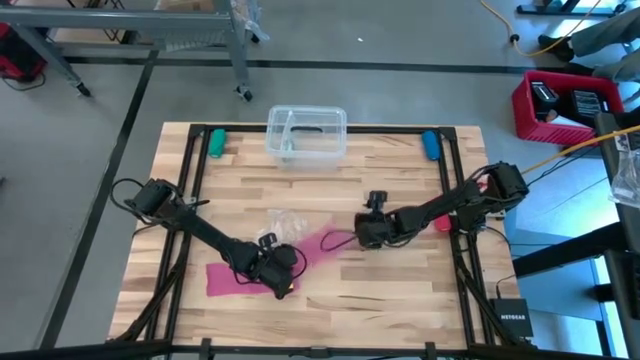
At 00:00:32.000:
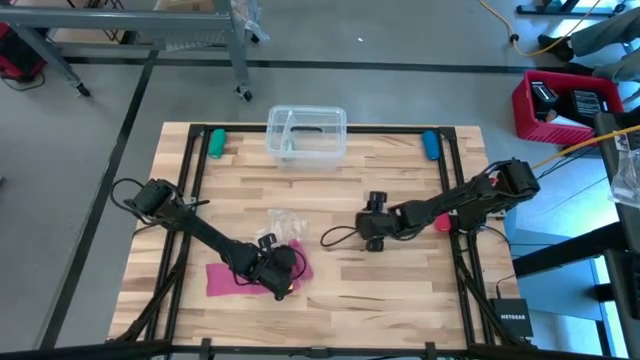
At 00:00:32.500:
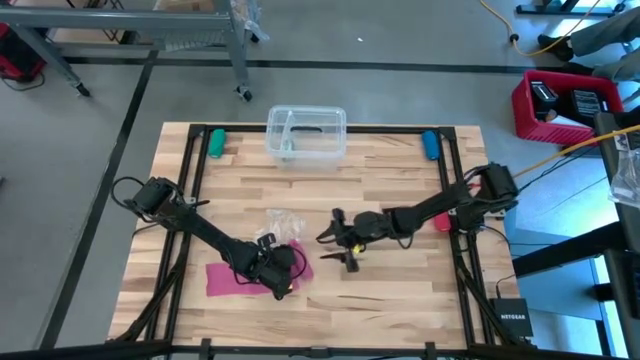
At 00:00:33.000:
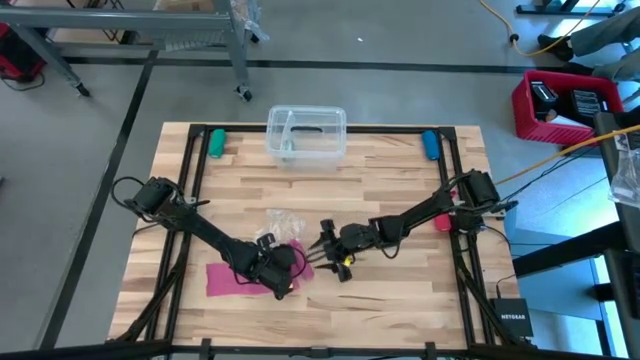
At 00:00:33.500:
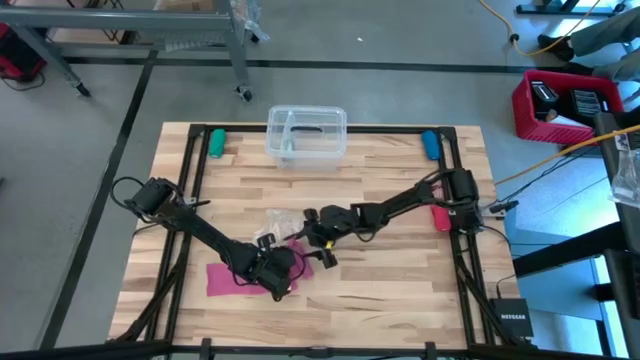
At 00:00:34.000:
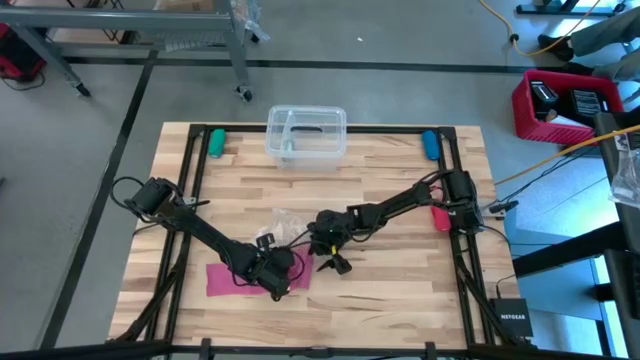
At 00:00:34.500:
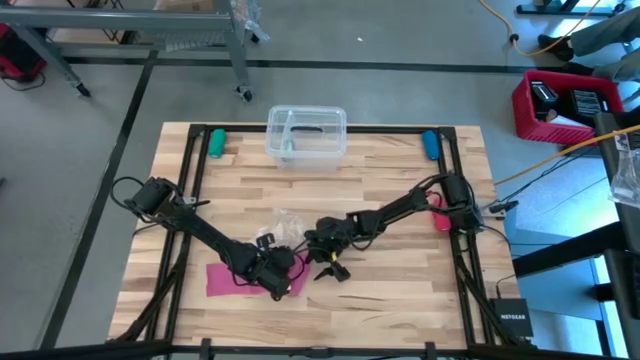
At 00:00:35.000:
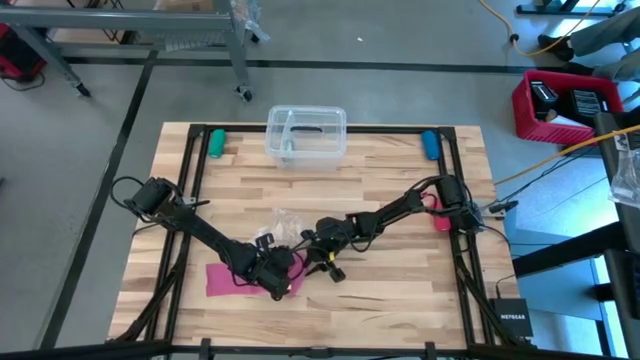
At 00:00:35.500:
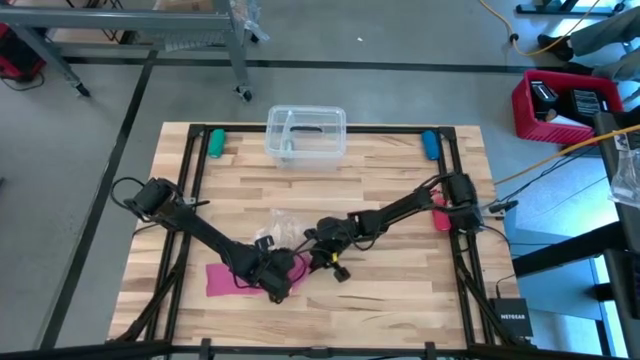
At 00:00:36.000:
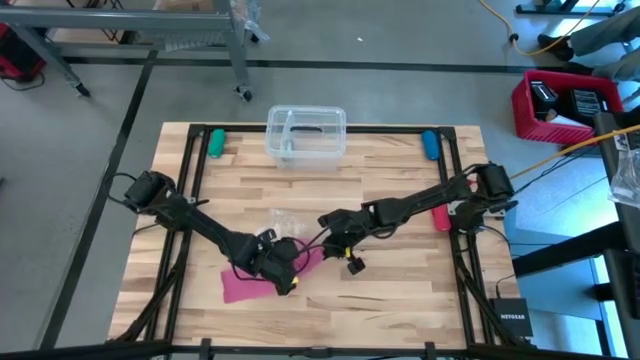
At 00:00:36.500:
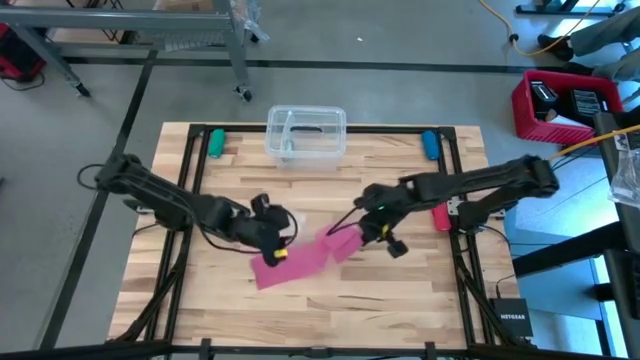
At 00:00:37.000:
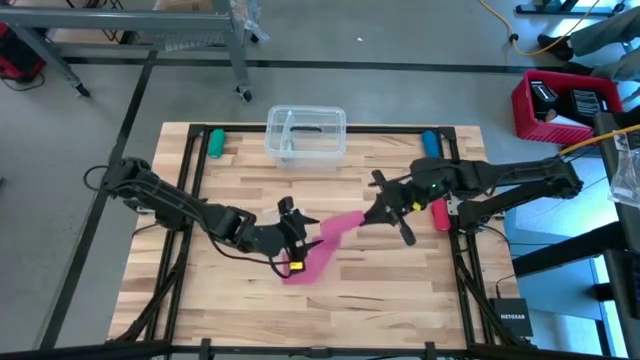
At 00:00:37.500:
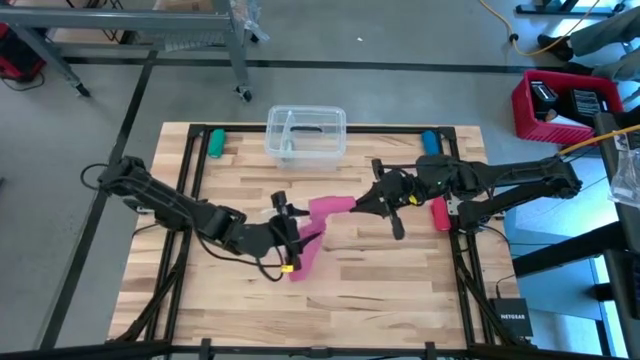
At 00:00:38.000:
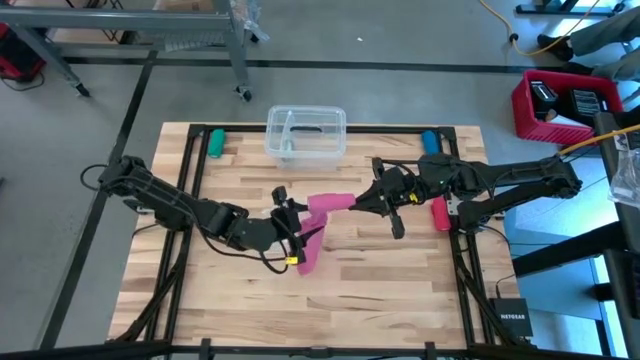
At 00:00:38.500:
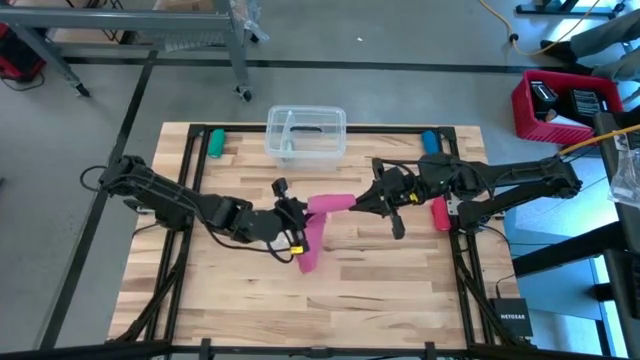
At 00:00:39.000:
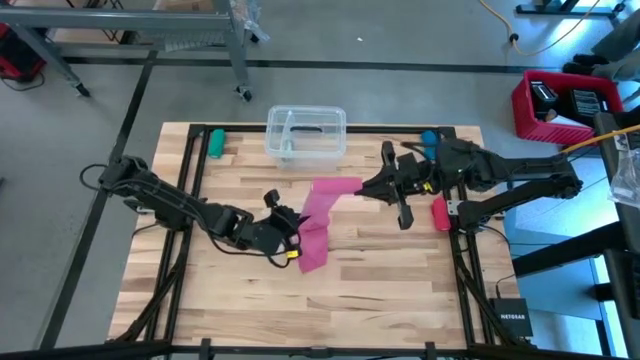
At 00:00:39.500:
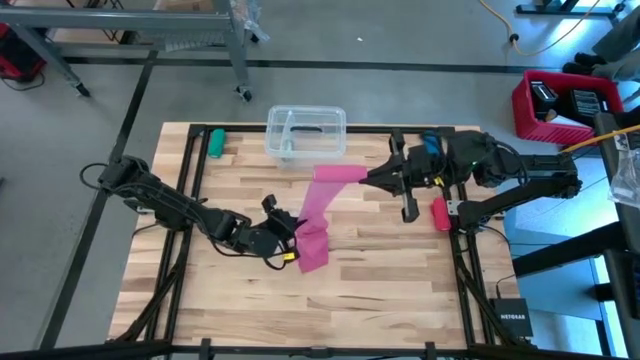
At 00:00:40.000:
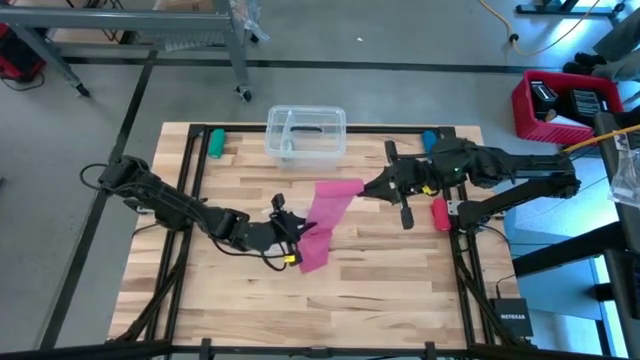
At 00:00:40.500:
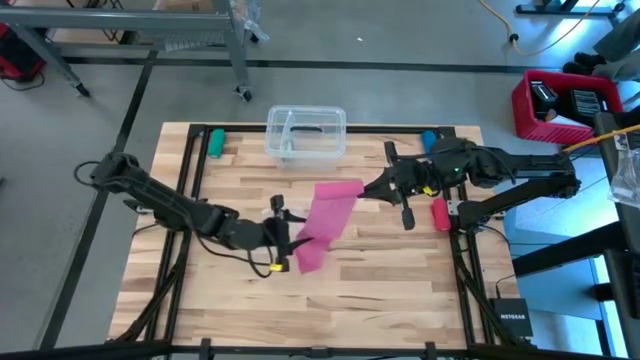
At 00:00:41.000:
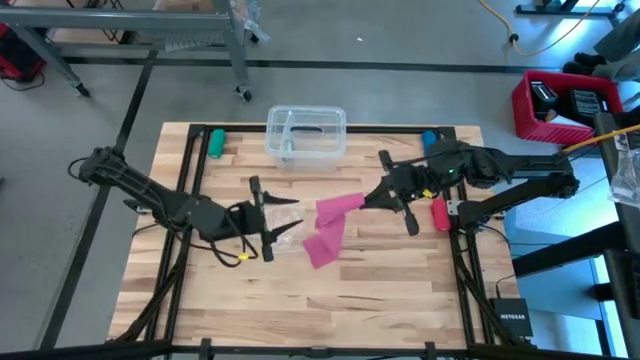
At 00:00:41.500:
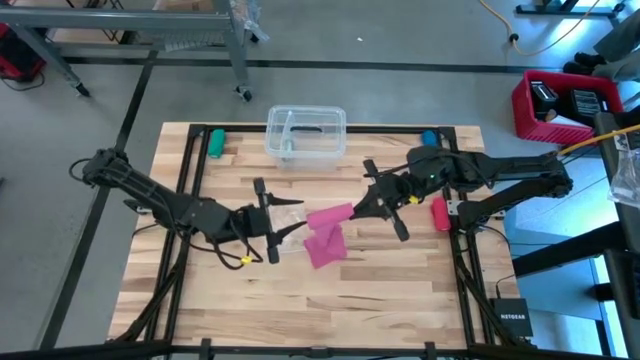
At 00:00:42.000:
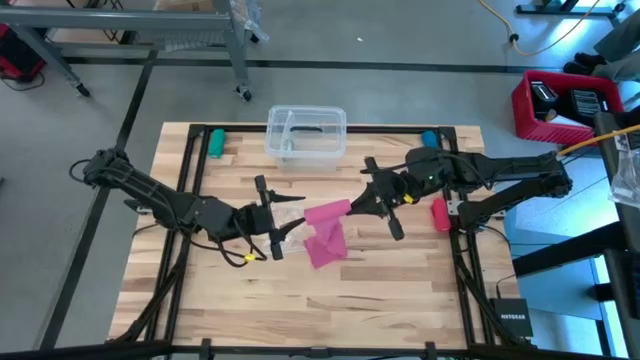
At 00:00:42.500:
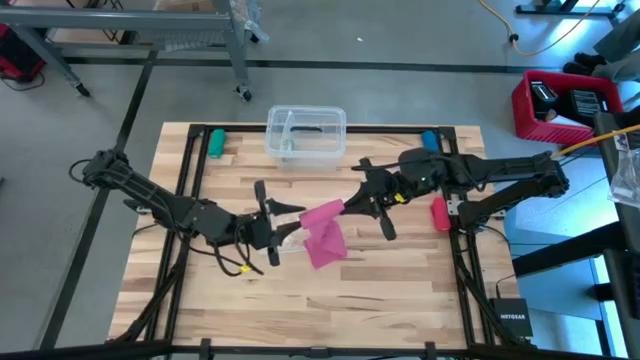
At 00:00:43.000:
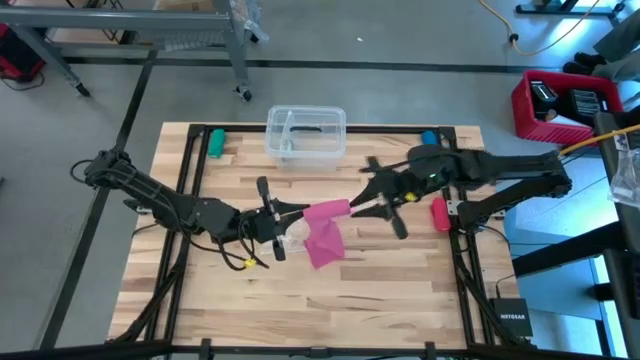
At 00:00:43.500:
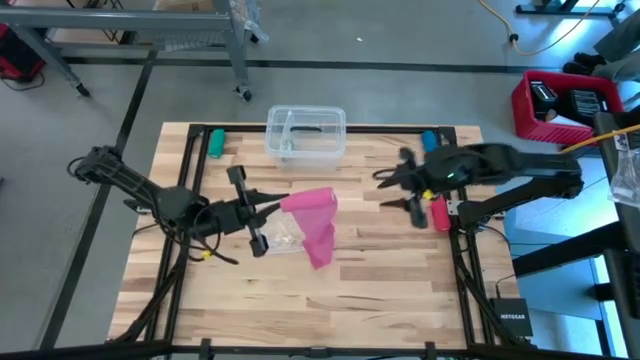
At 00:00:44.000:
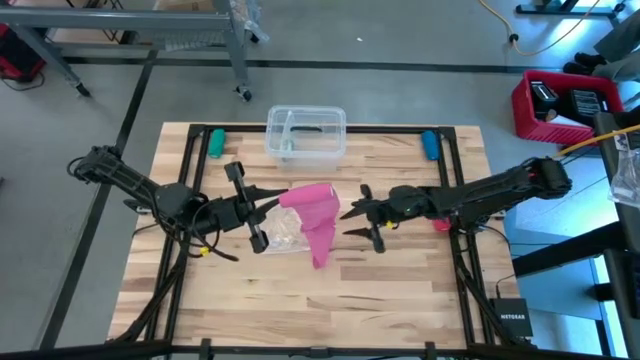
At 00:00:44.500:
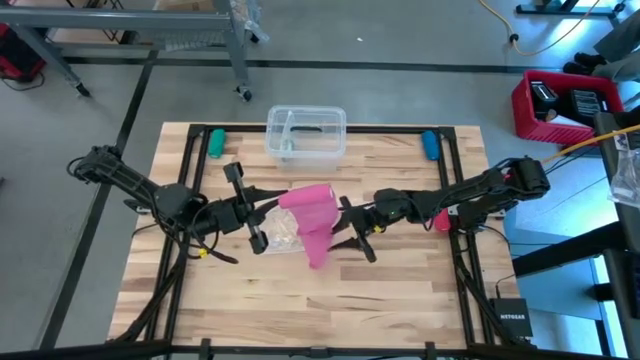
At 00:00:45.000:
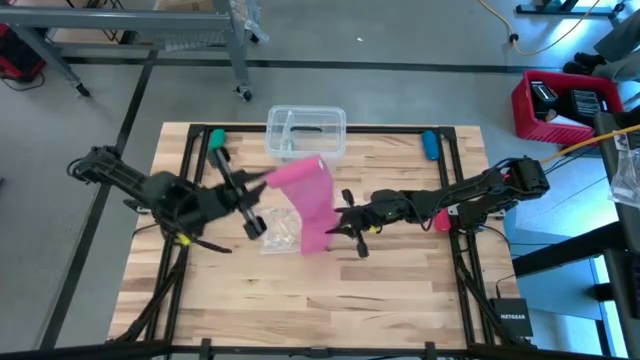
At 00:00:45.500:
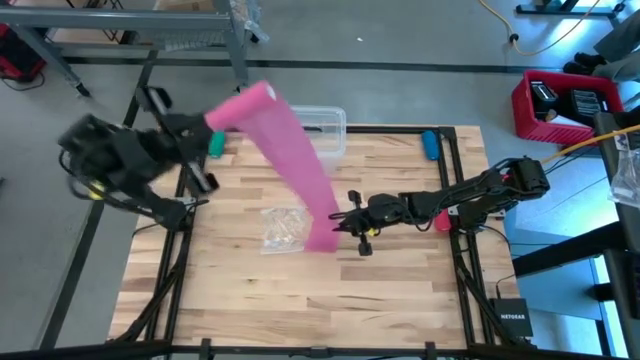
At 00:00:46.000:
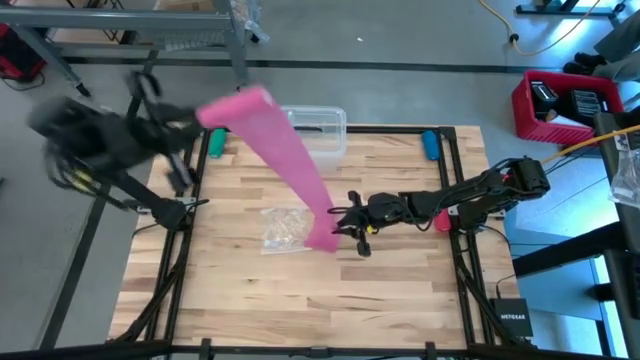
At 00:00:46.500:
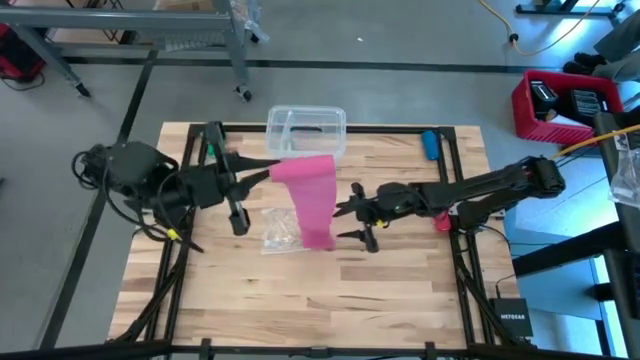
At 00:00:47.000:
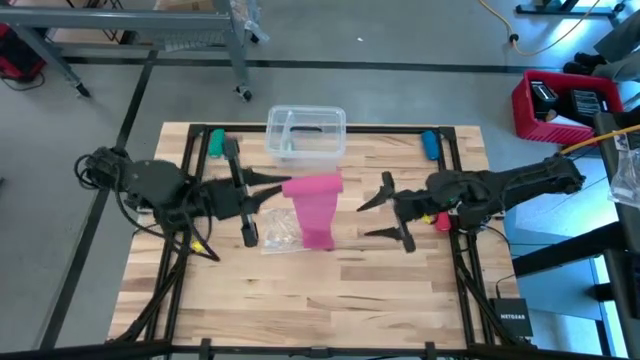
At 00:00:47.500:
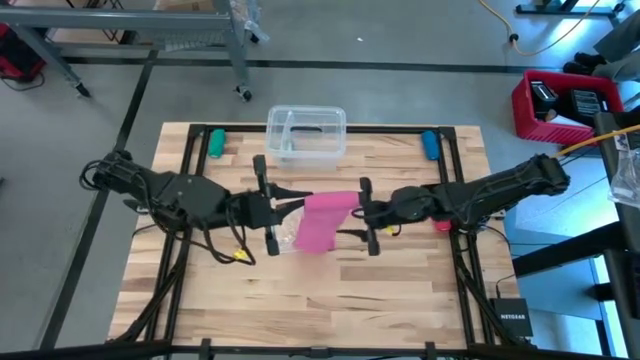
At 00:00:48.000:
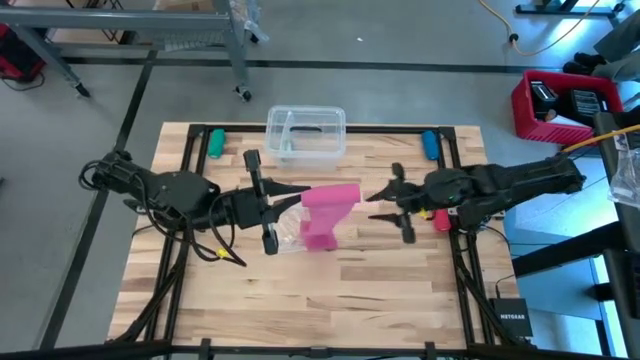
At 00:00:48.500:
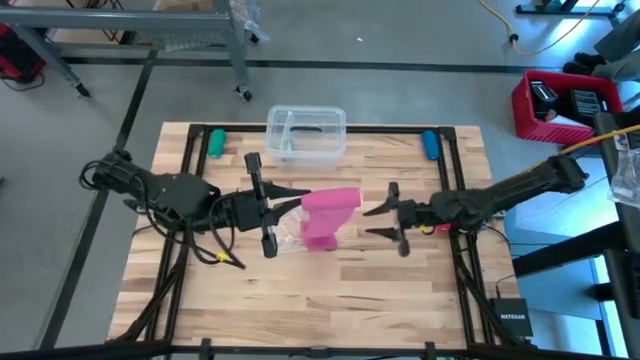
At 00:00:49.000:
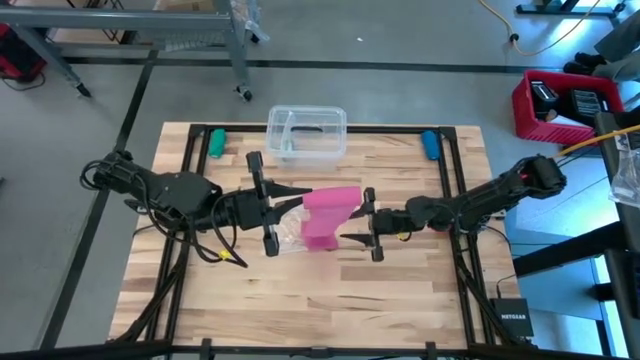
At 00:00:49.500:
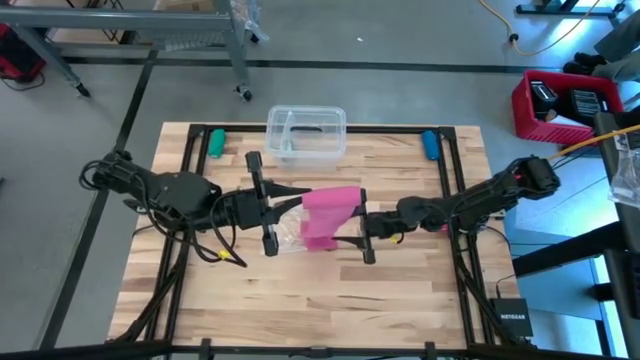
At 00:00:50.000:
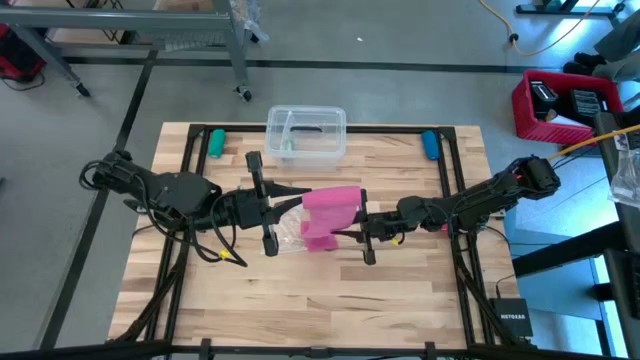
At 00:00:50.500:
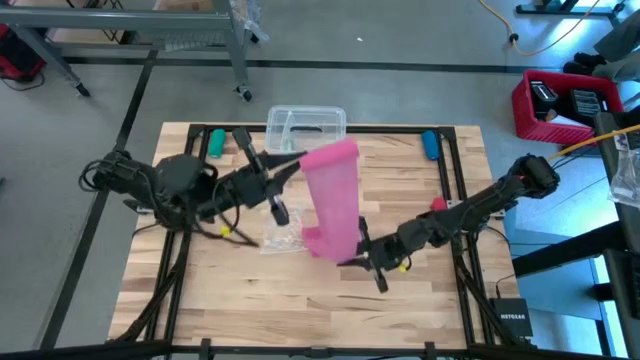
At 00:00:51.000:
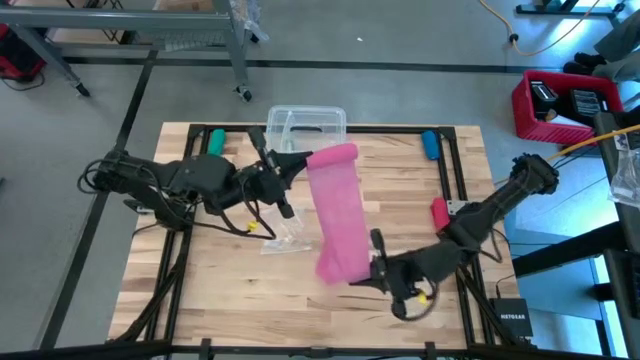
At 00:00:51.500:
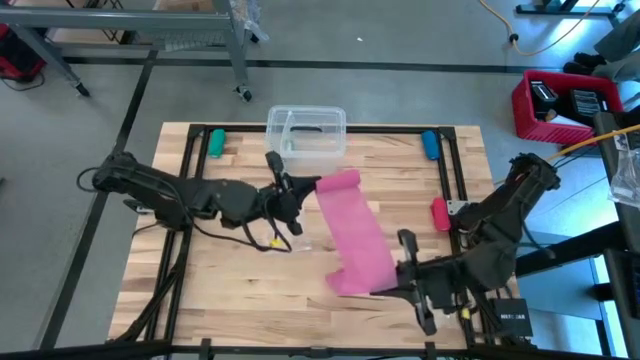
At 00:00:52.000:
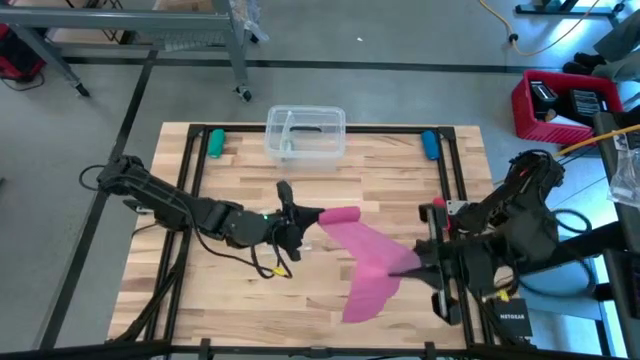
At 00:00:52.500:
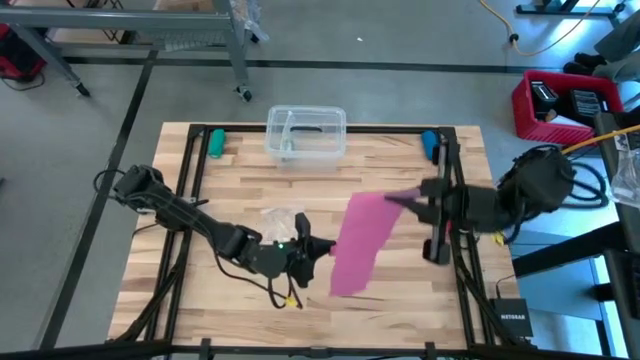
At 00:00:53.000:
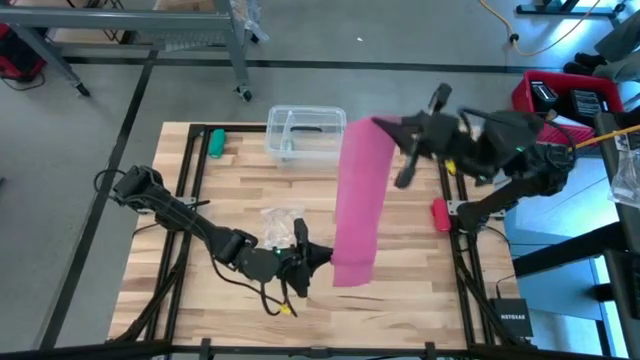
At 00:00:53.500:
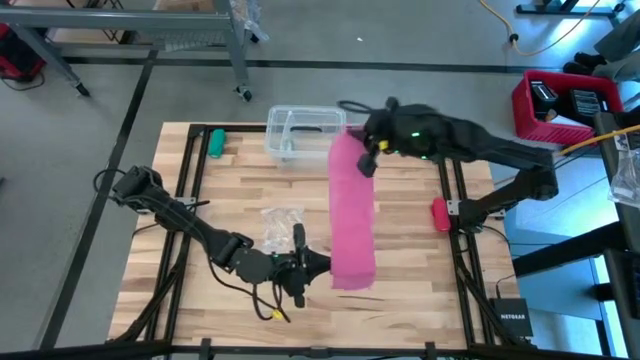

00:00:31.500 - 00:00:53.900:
Task: Roll bandage
Roll the pink bandage
